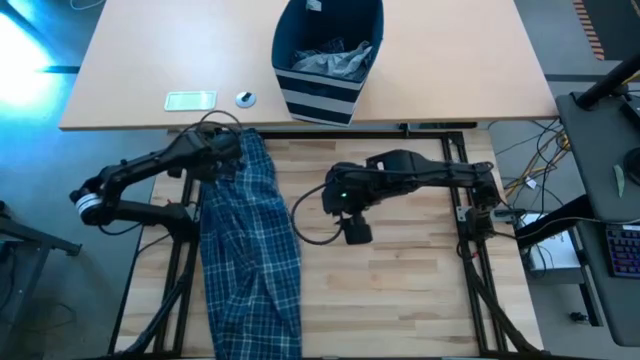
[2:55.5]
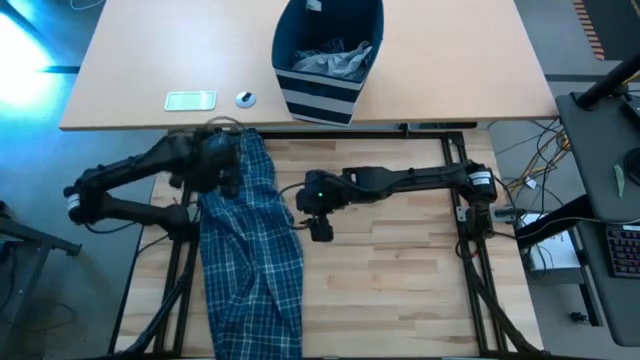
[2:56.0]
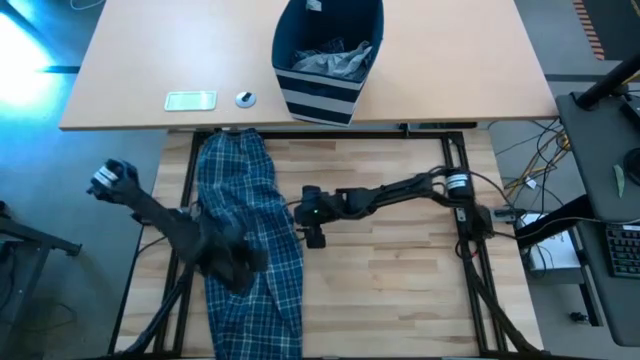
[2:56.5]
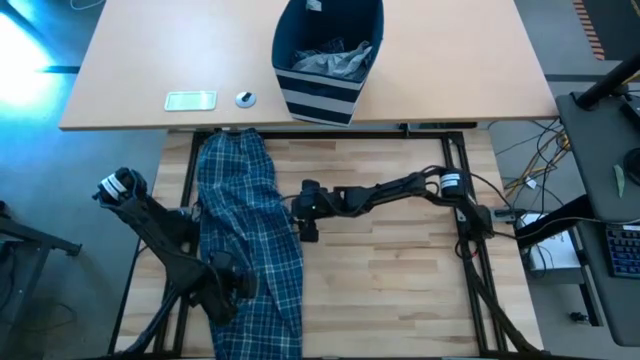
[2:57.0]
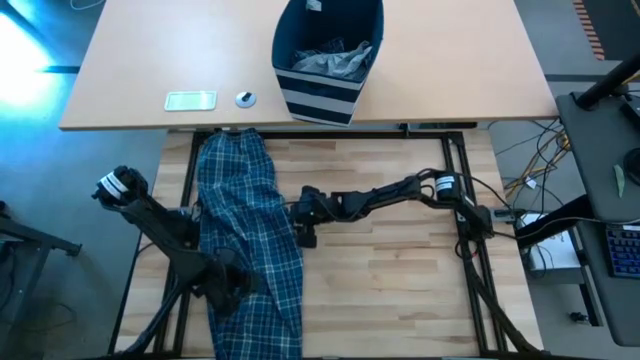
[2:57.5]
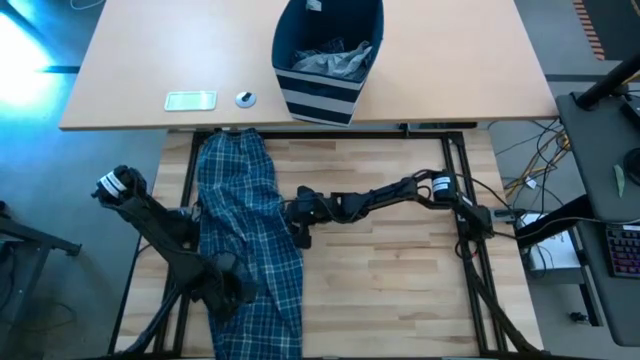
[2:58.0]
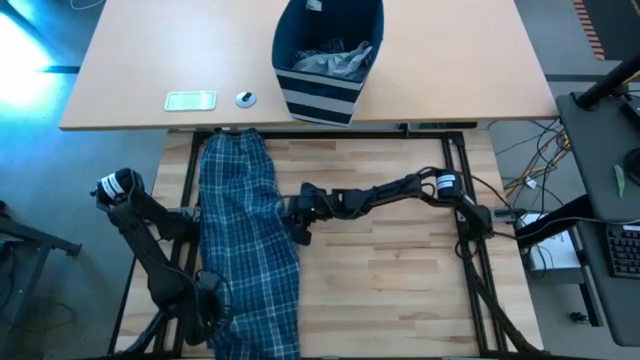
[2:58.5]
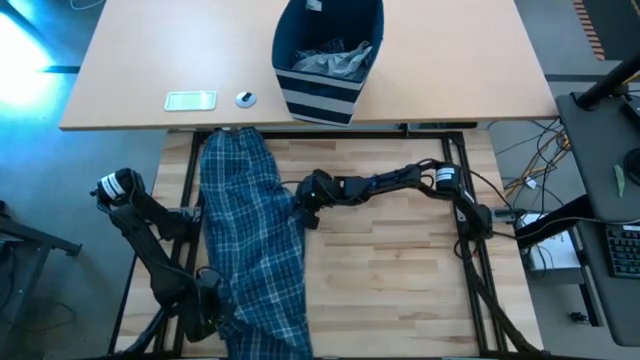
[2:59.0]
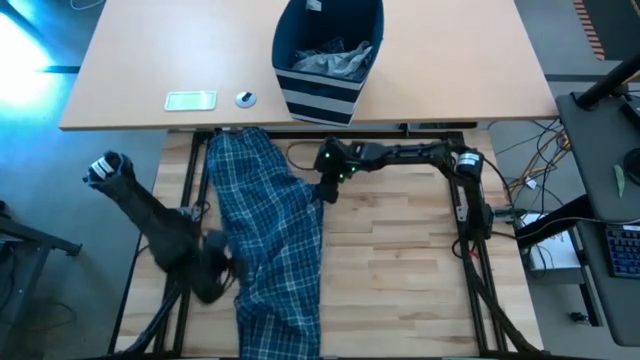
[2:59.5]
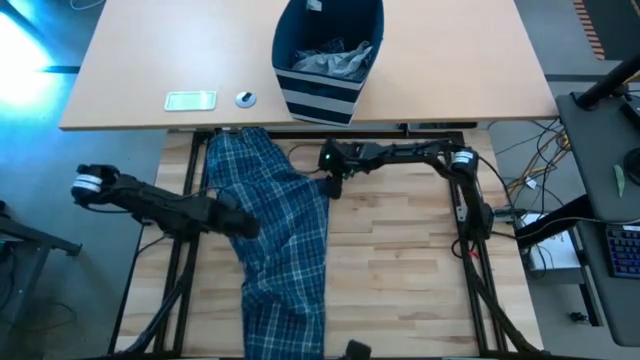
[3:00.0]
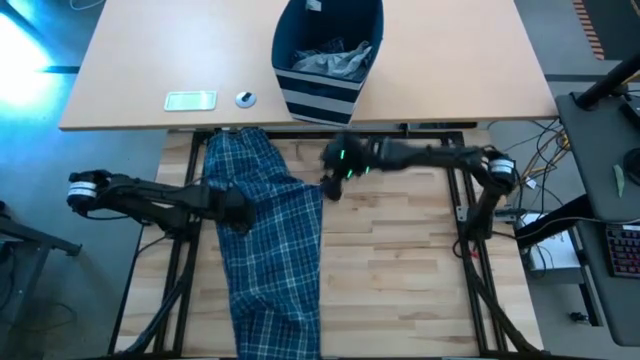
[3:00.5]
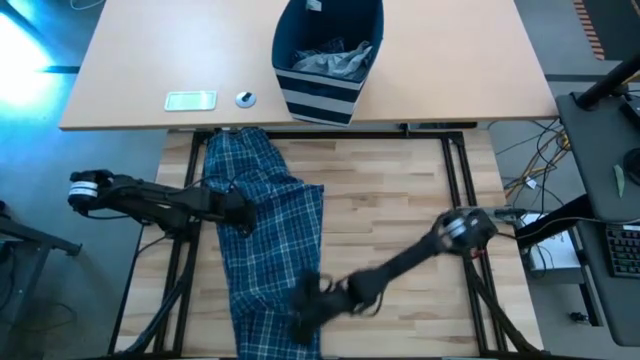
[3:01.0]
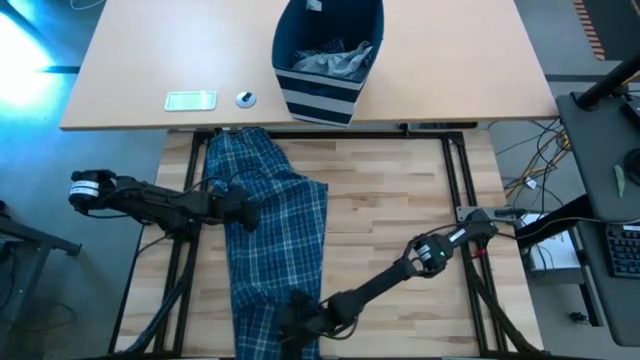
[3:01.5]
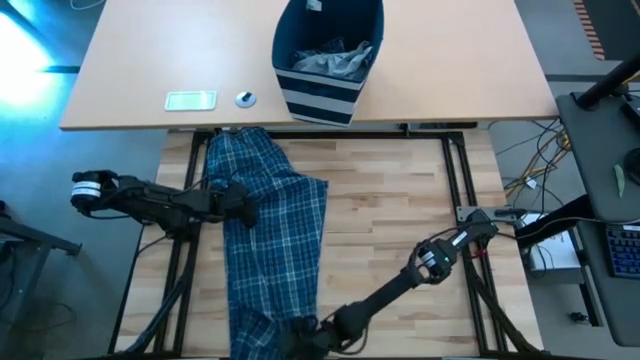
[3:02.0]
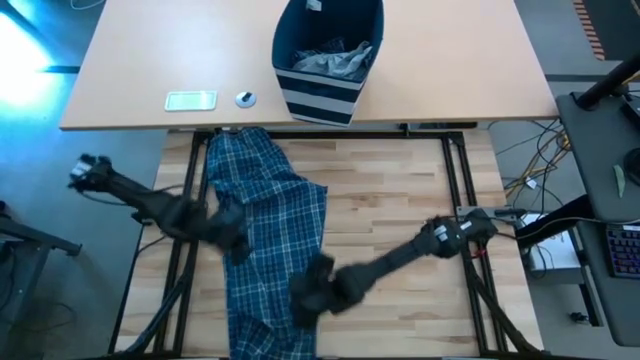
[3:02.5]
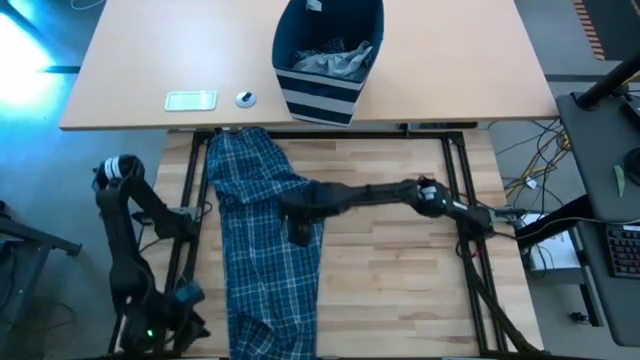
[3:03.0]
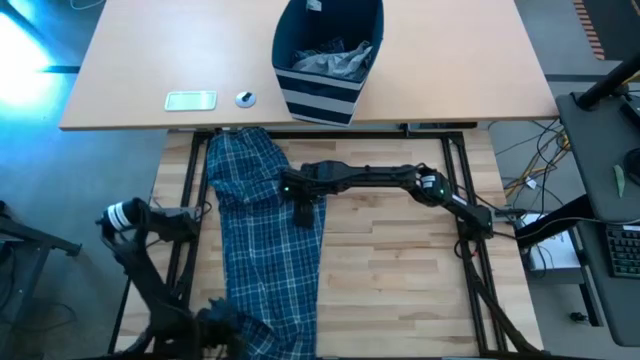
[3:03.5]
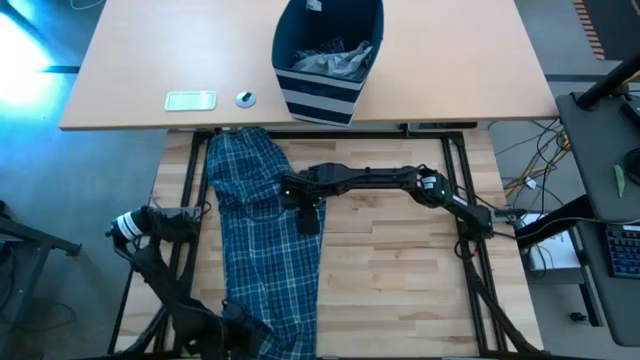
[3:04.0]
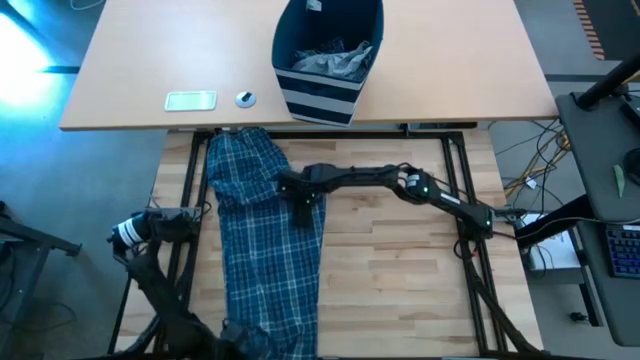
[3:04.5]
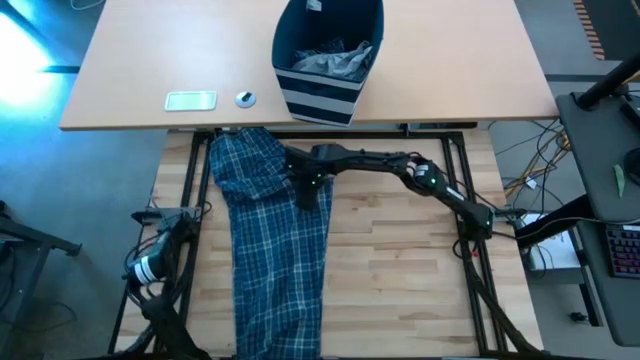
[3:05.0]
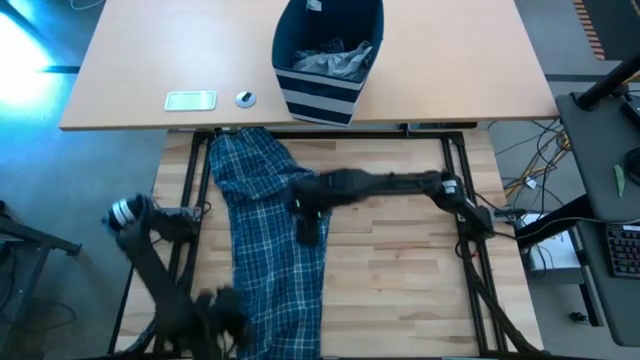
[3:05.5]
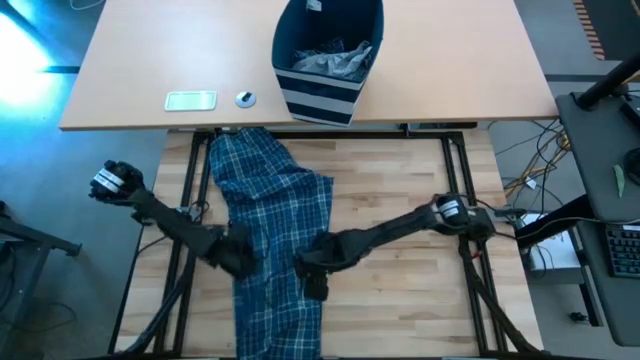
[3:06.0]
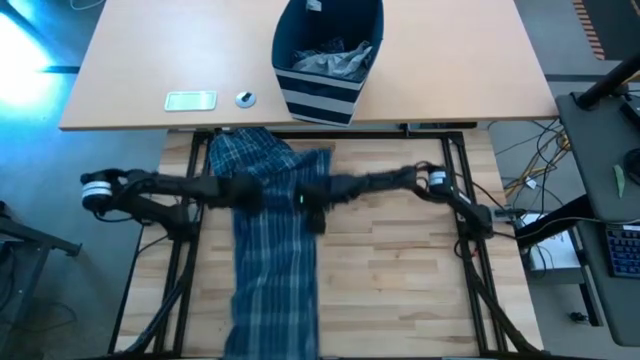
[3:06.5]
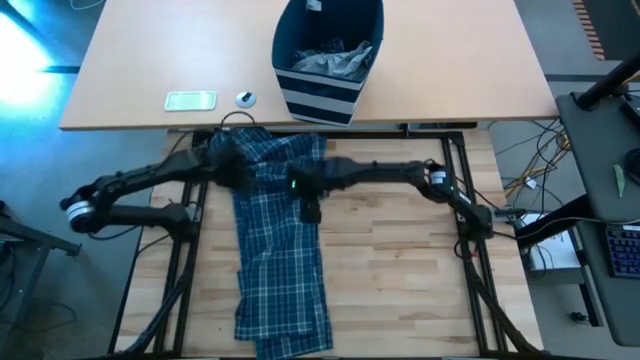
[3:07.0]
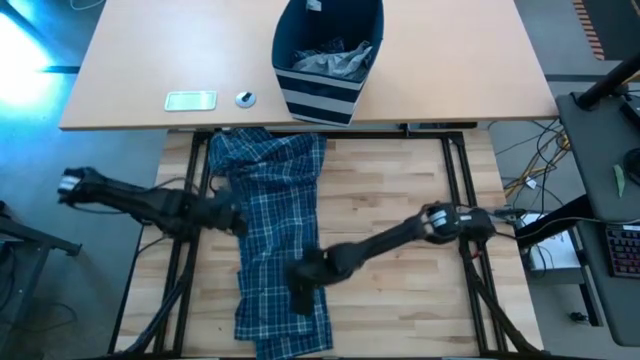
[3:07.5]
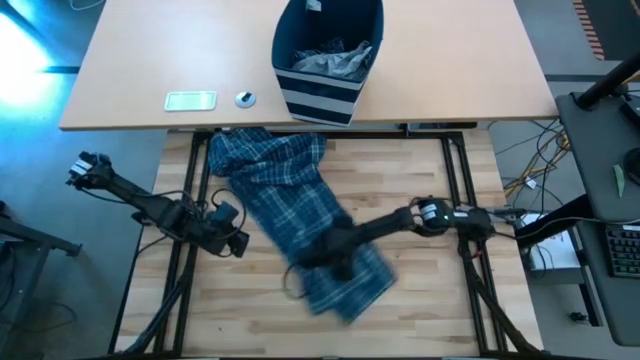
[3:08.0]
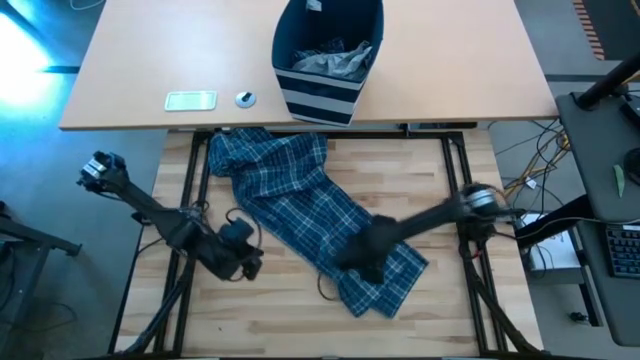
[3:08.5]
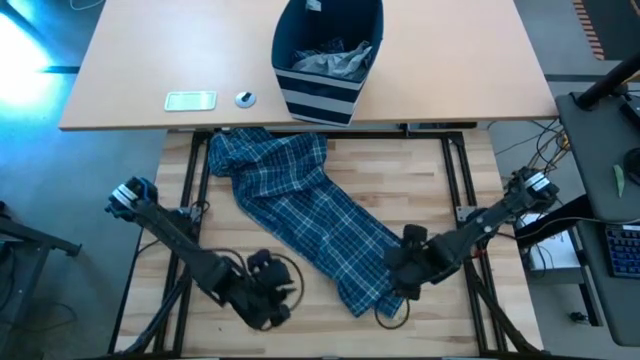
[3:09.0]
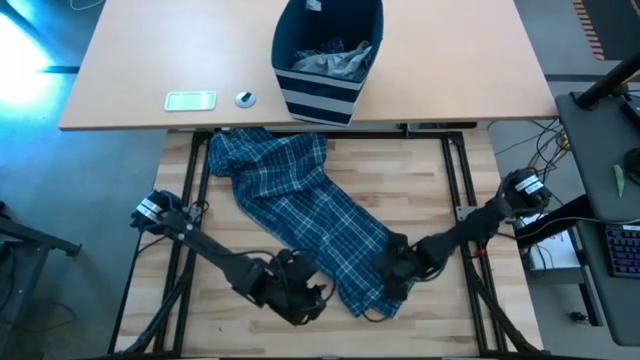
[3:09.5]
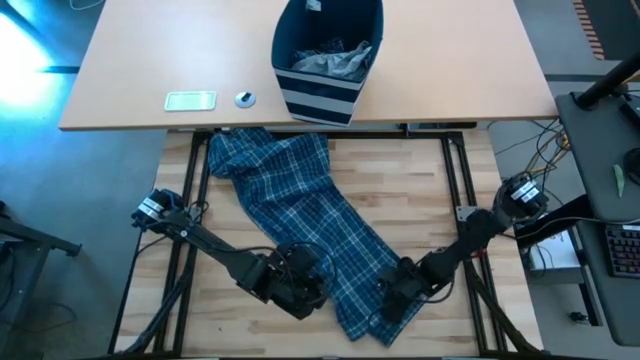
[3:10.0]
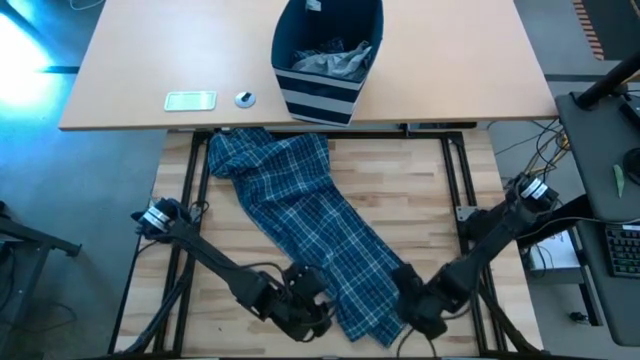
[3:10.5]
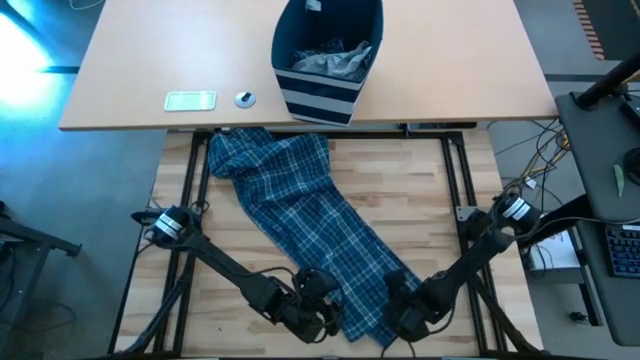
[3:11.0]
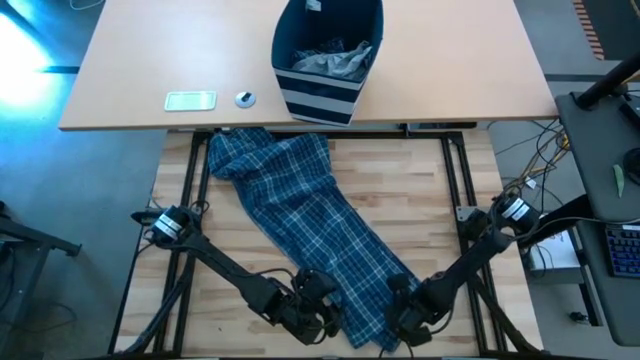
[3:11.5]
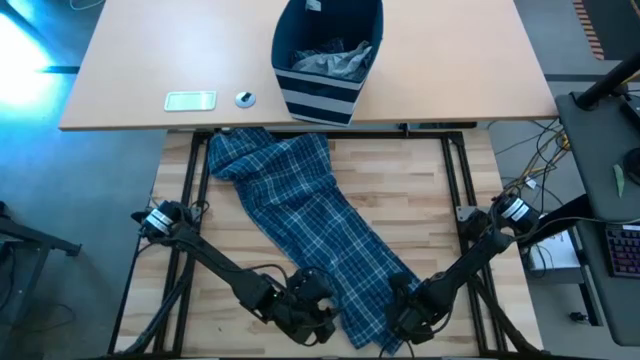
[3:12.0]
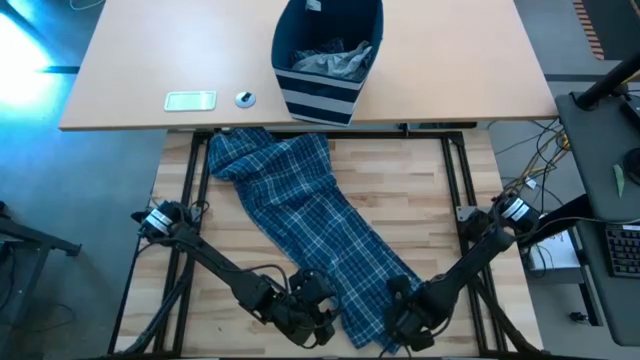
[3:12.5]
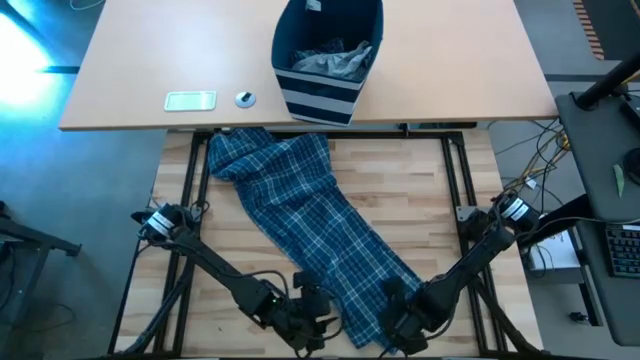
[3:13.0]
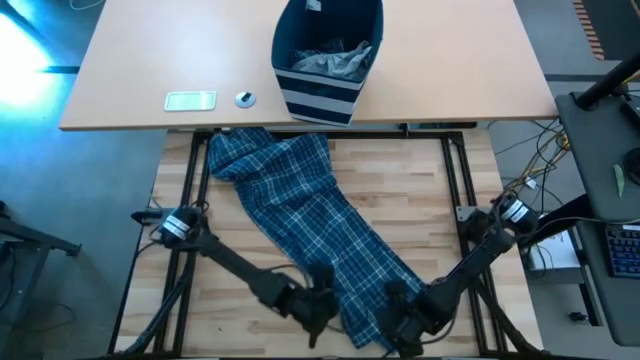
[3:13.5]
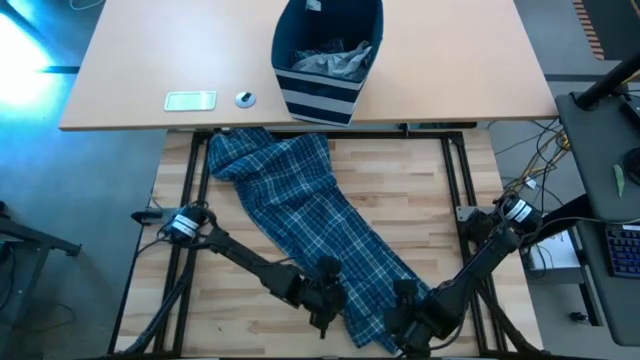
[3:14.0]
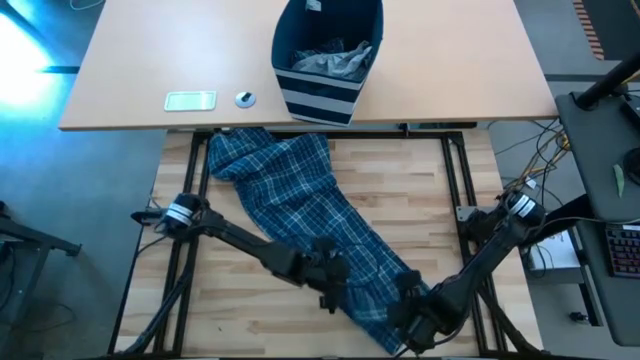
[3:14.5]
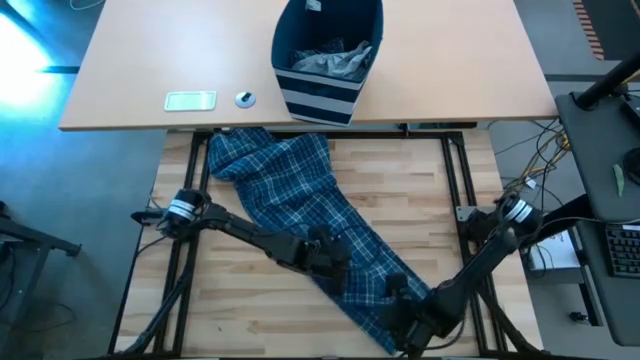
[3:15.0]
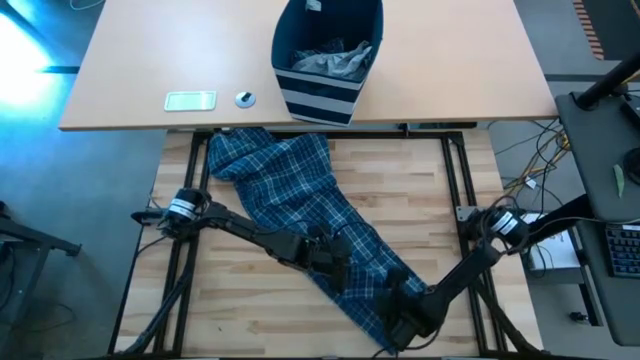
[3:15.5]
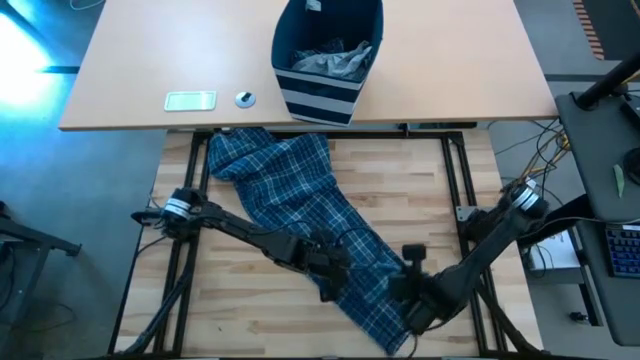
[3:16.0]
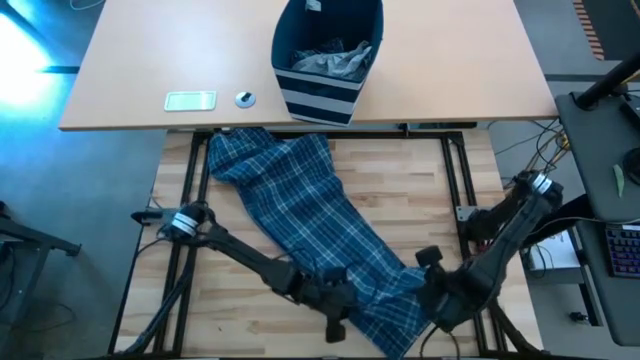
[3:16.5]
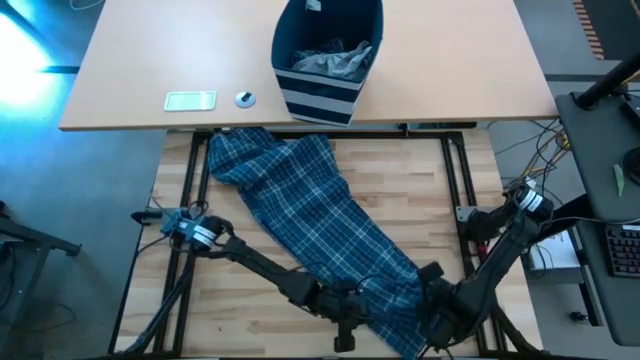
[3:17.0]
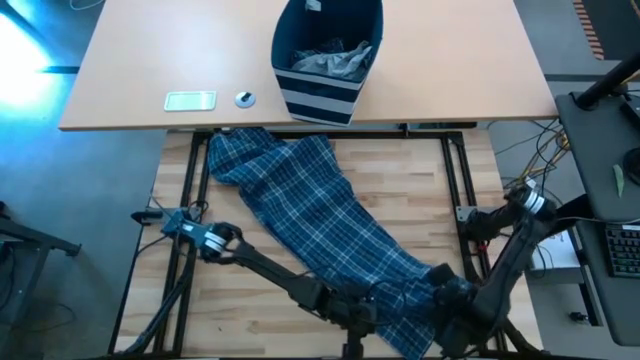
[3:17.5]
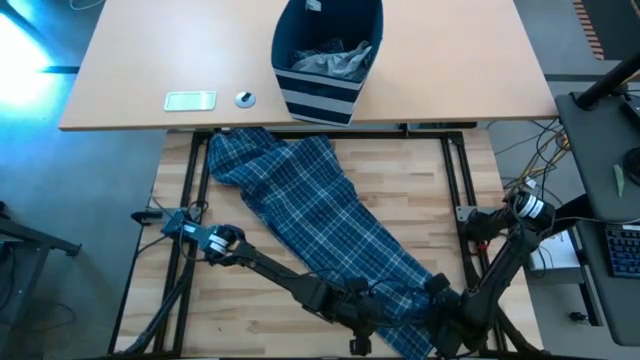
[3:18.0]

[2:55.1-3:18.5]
Task: Fold Laundry from Bin
Fold the blue patterned pants
